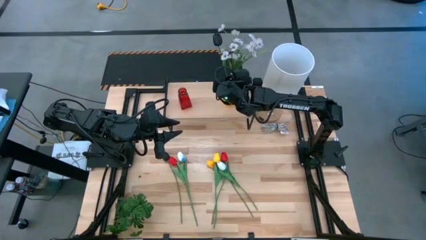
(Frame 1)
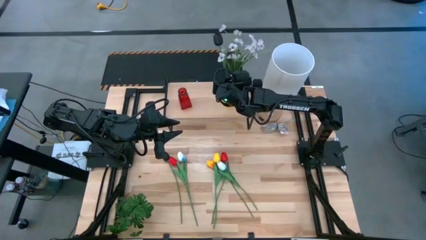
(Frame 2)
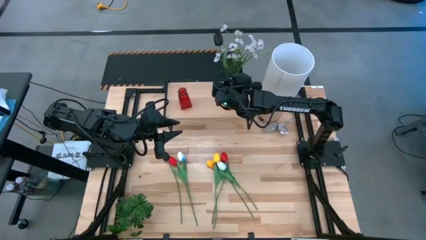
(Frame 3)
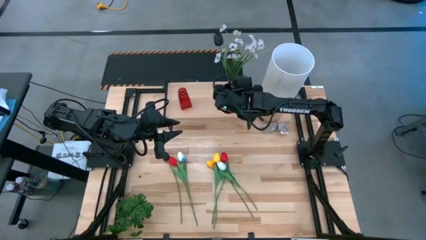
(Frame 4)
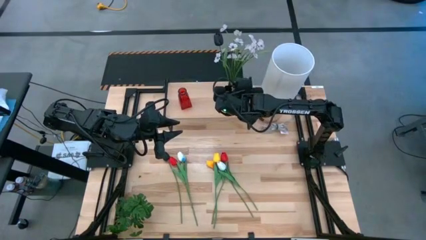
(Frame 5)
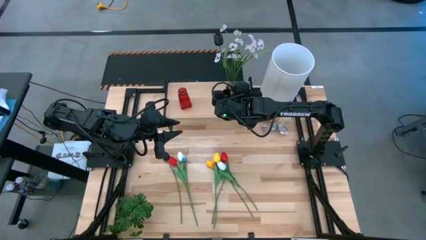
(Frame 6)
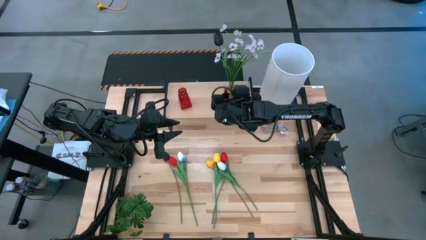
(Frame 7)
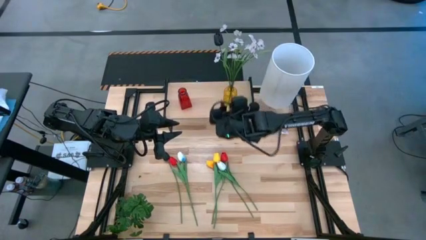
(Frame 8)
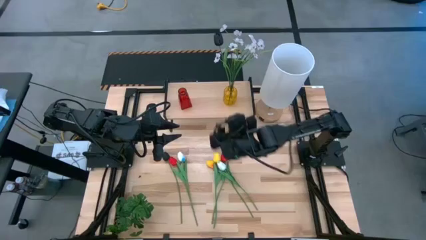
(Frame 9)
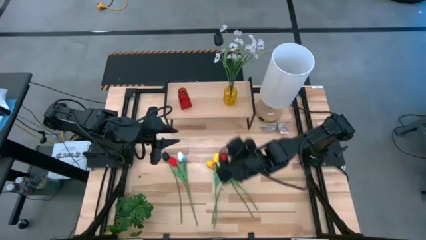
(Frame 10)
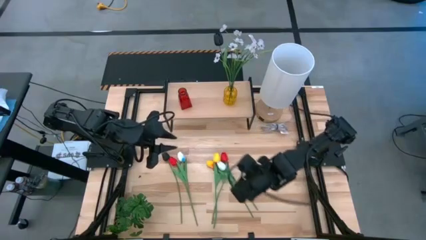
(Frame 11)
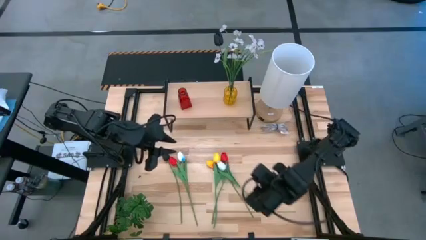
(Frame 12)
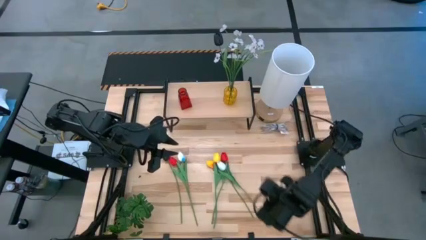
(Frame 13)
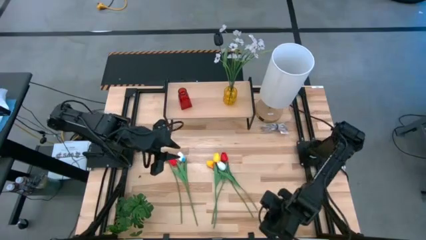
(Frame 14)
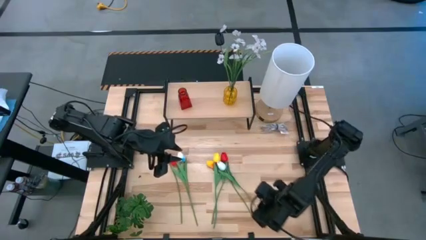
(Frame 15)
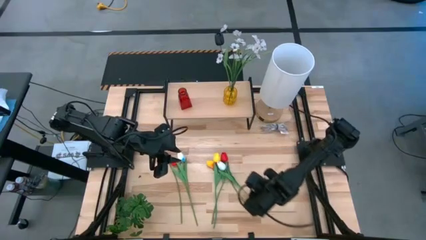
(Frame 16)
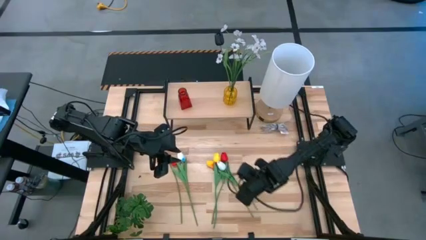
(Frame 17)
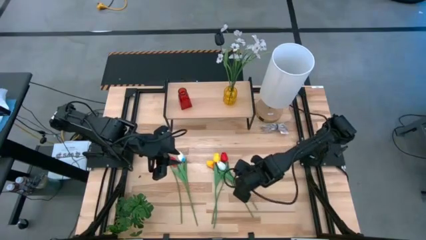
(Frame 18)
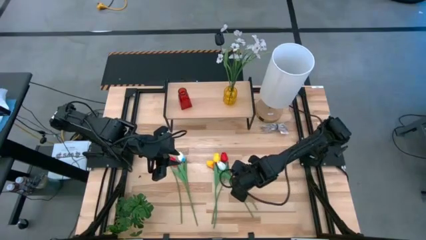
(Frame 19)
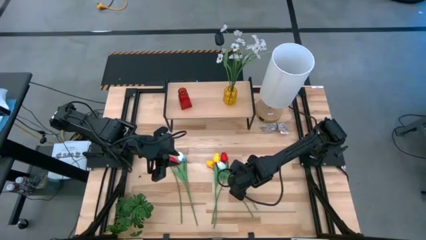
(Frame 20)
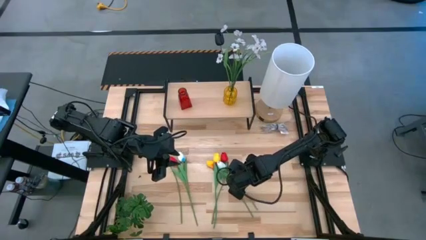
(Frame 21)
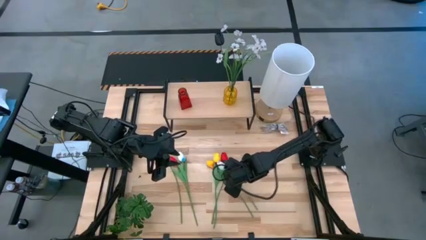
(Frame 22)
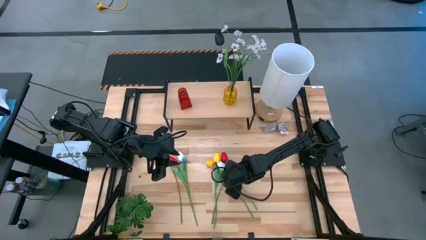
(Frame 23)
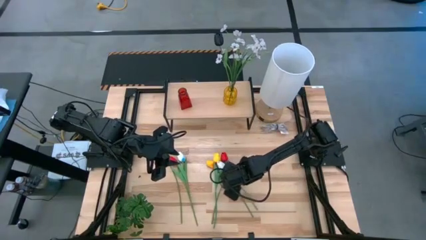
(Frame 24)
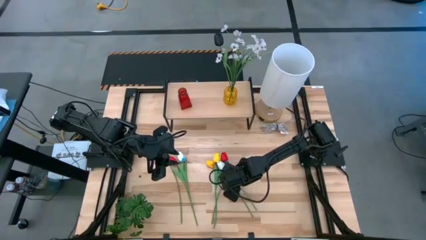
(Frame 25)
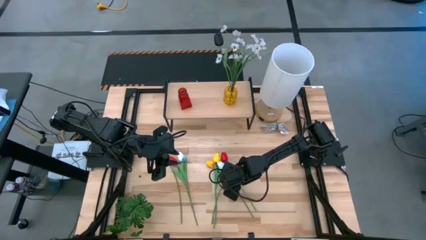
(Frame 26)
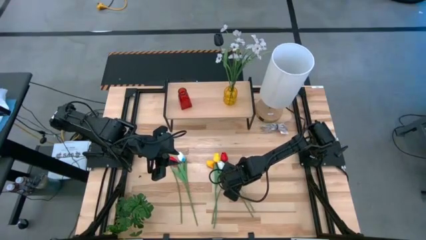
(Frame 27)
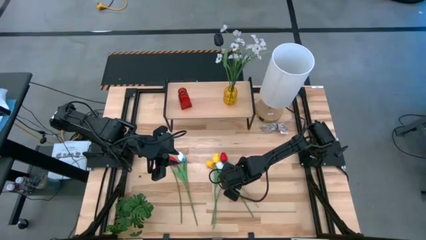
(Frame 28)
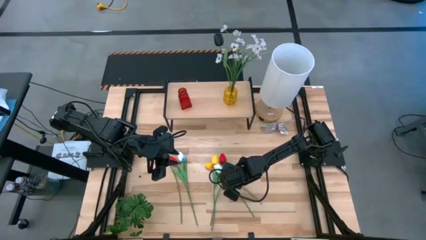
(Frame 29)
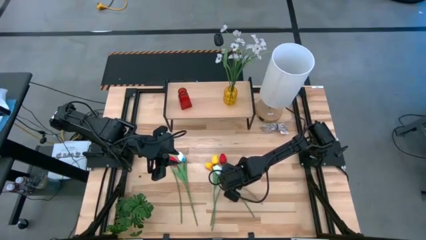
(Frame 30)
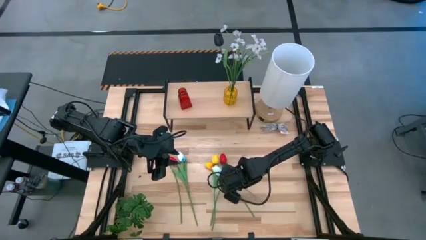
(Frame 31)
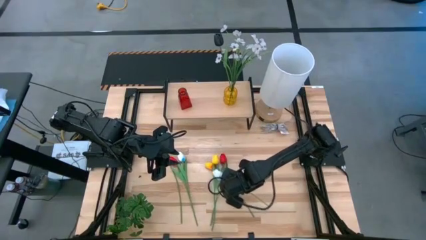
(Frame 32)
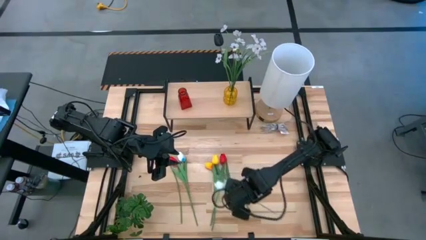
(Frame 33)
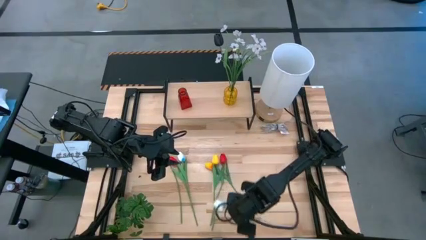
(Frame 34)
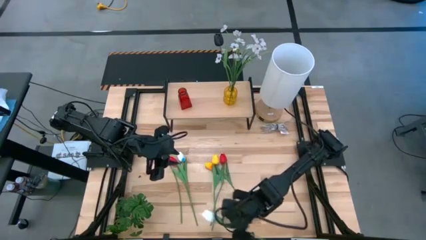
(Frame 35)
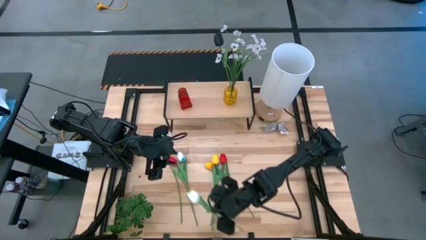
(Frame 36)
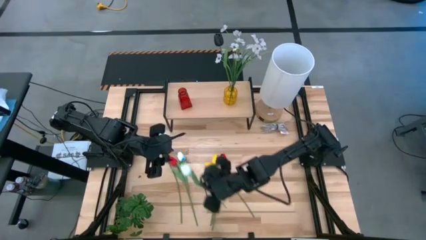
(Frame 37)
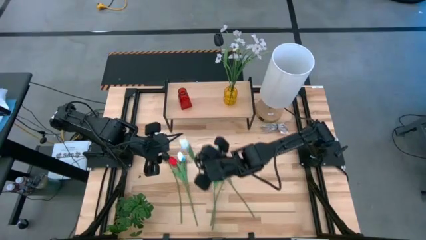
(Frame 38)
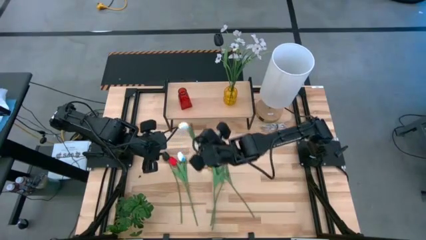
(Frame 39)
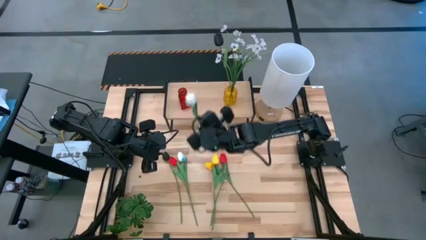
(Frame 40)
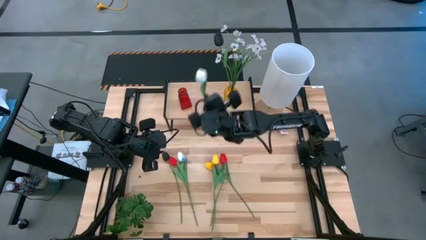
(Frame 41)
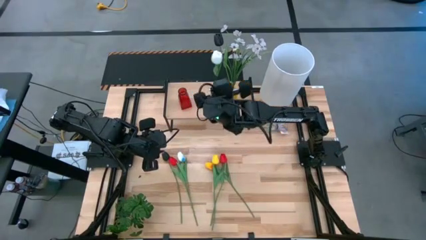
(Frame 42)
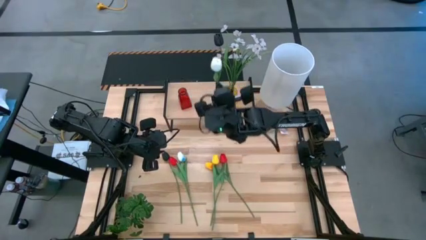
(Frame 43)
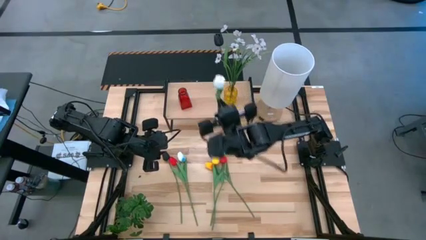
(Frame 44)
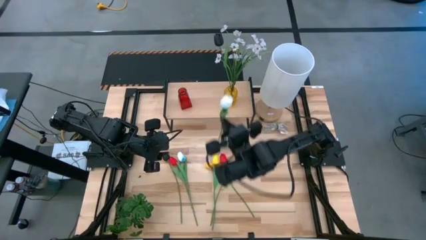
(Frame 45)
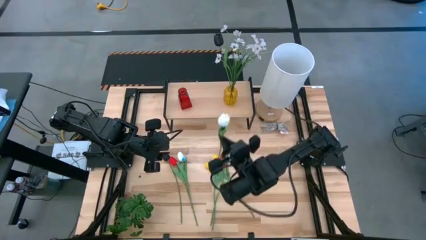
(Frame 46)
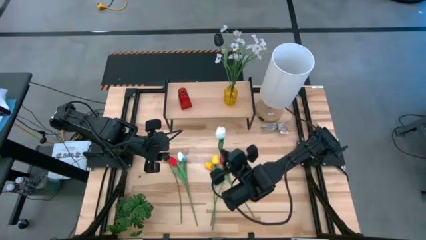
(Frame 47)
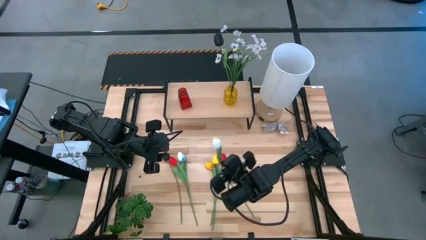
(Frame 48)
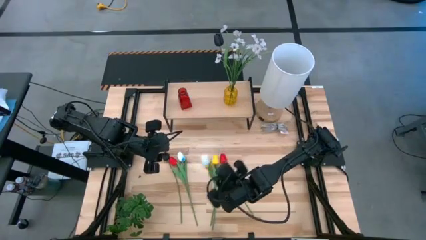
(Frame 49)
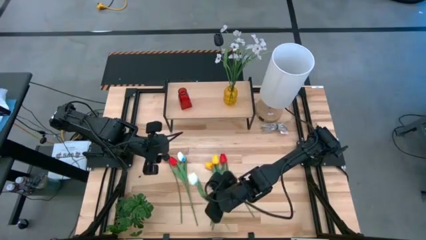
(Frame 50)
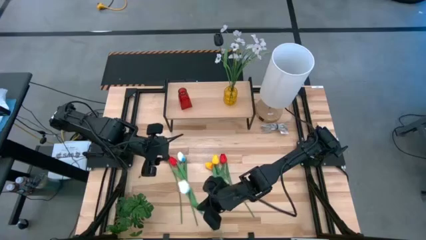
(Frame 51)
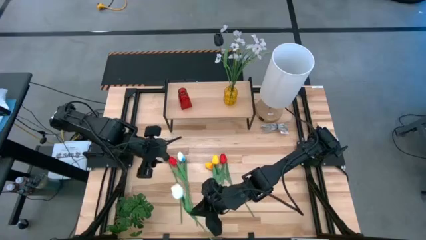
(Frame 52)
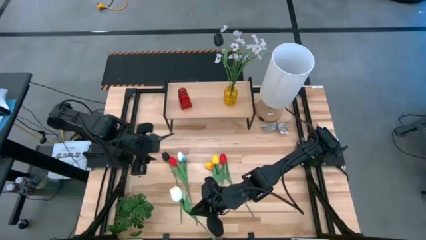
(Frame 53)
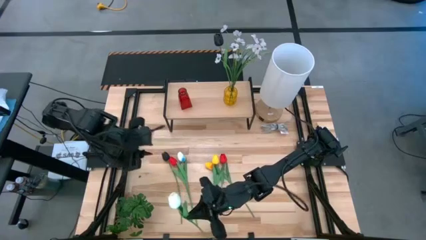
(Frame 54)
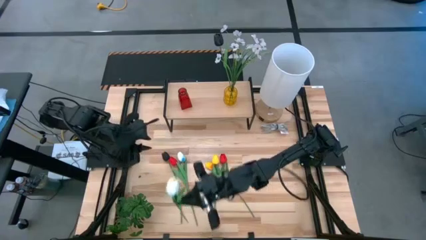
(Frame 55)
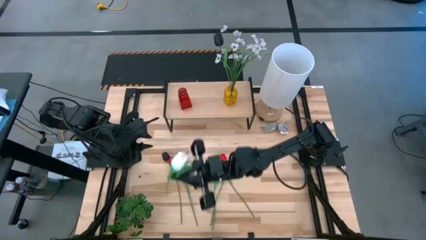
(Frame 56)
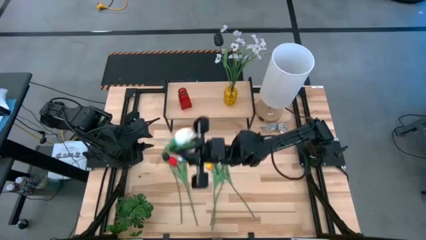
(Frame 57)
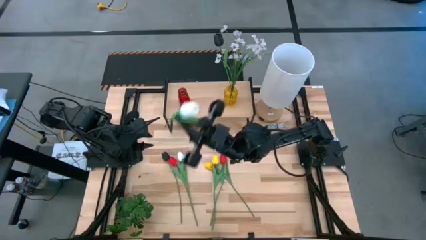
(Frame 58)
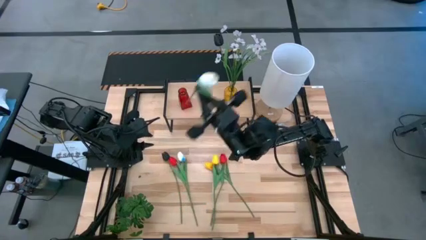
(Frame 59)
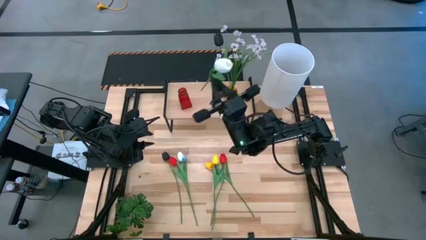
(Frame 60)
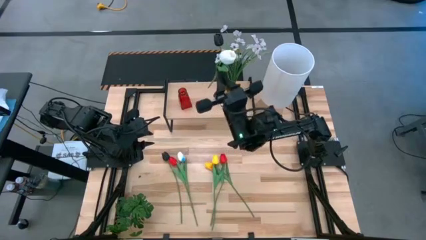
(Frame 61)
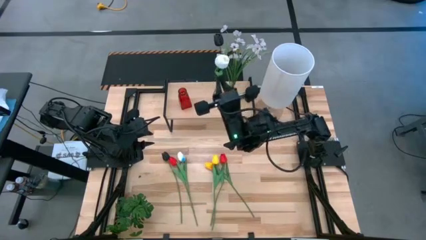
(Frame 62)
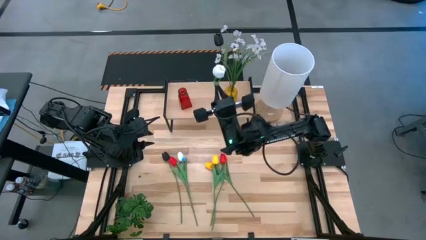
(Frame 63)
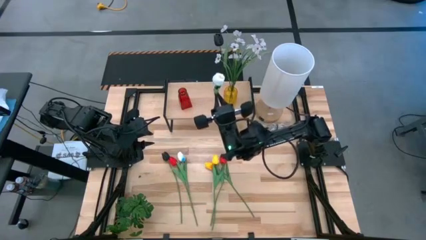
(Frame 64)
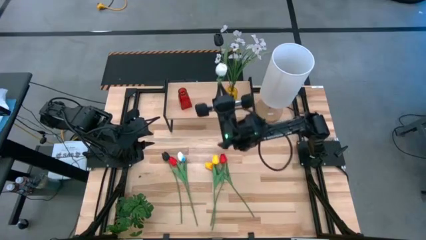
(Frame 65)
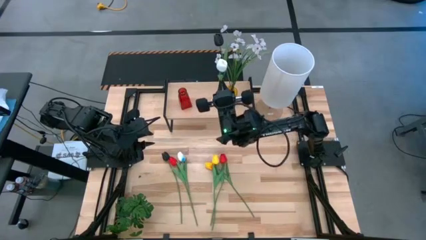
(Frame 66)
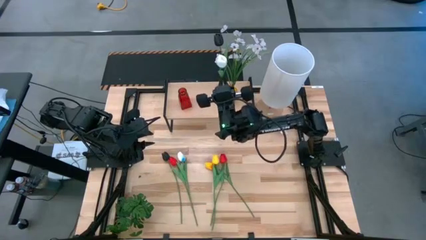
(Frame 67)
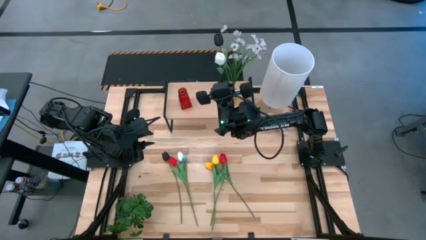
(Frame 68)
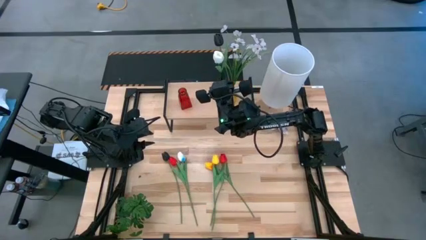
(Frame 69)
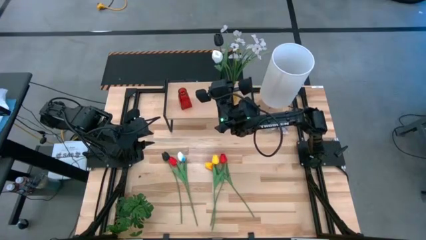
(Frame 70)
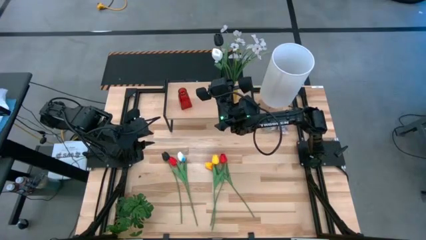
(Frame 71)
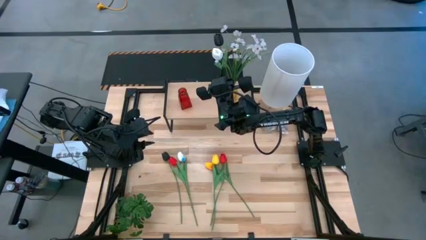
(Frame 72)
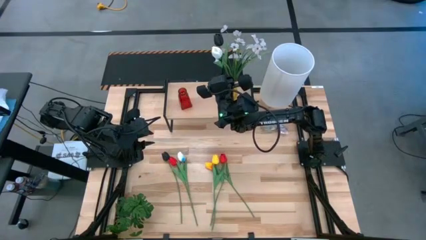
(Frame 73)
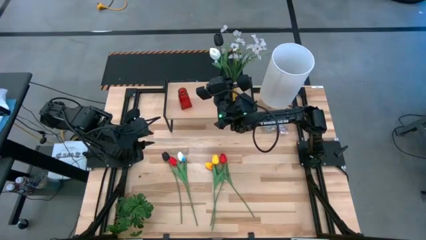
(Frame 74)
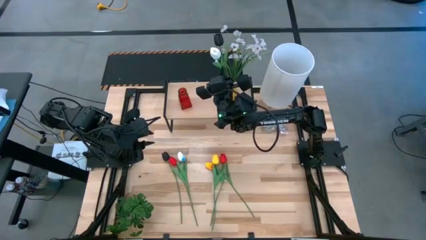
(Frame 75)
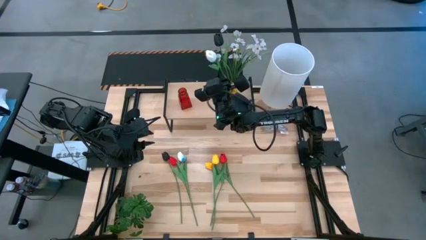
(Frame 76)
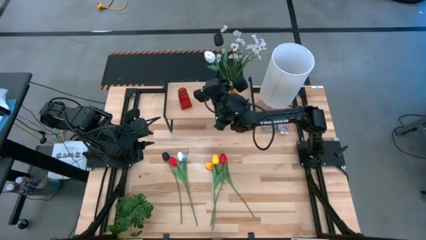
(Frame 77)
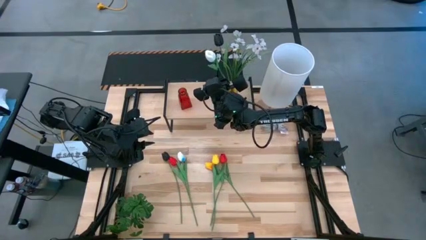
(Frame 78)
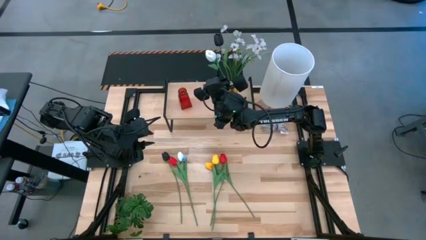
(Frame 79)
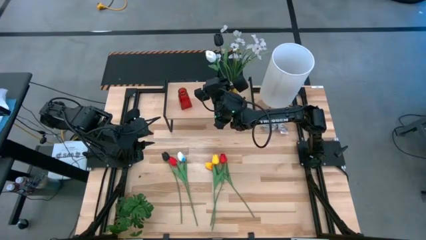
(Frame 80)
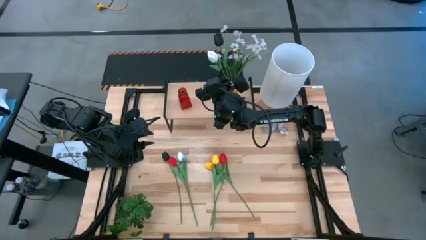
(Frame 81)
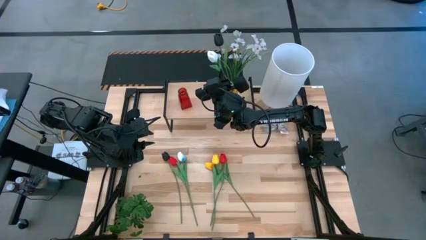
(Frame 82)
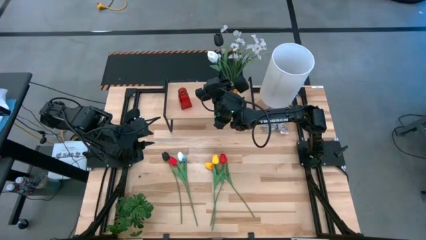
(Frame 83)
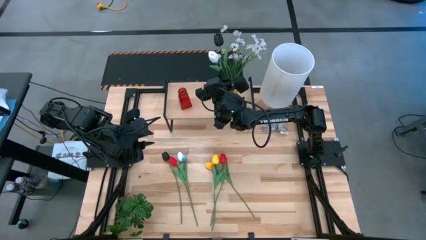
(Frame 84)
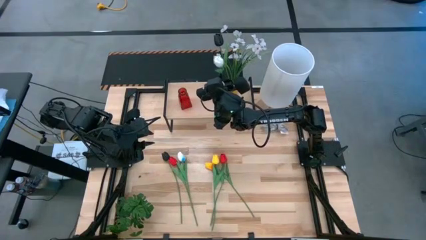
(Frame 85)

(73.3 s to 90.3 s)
Task: Pick and place flowers into a vace then onto a shelf
Put the right white tulip into the yellow flower vase
